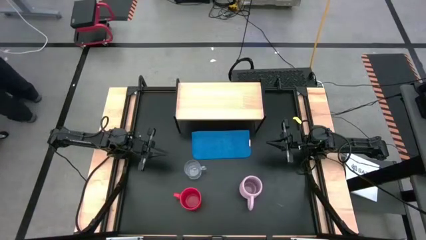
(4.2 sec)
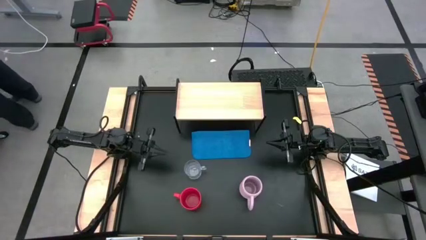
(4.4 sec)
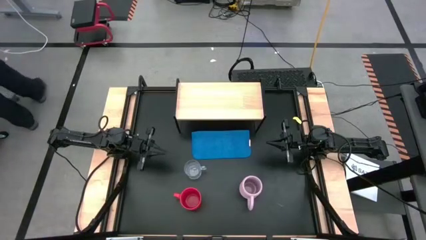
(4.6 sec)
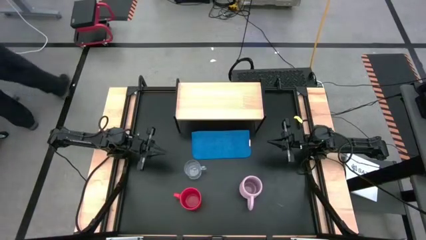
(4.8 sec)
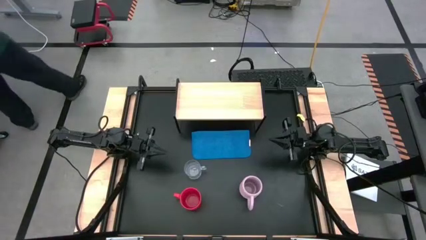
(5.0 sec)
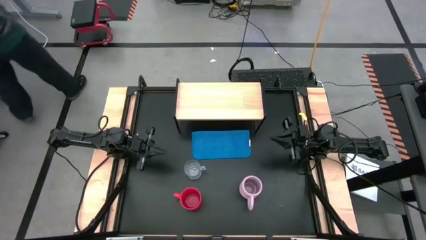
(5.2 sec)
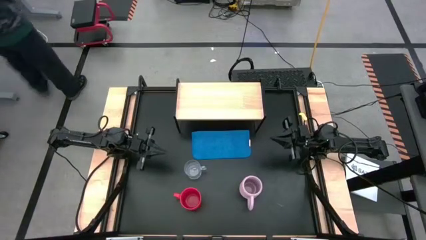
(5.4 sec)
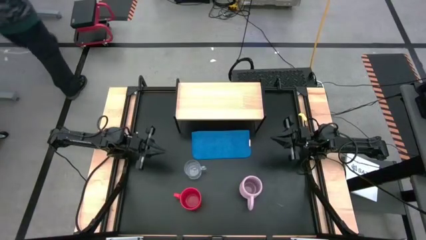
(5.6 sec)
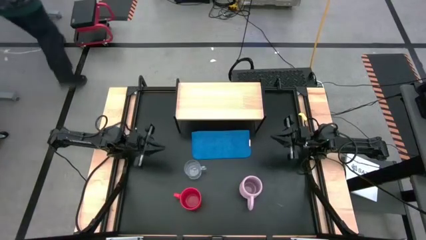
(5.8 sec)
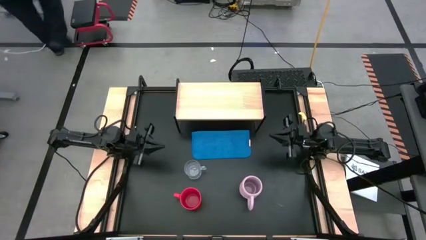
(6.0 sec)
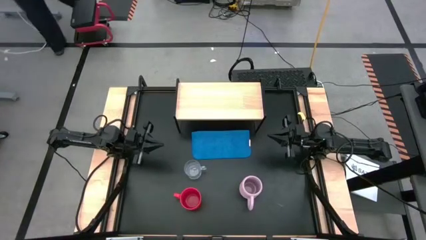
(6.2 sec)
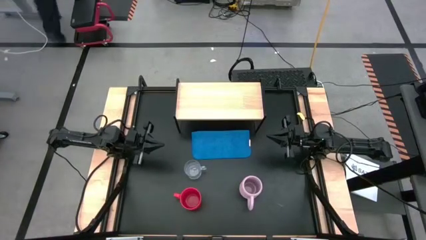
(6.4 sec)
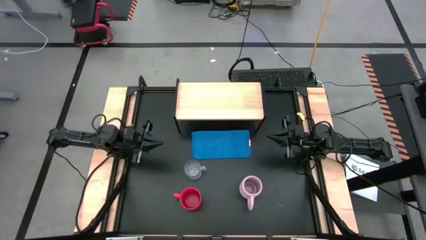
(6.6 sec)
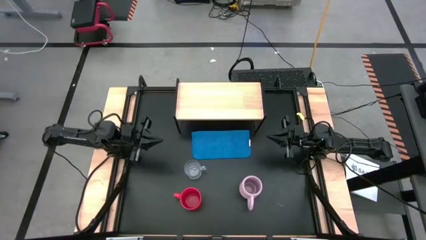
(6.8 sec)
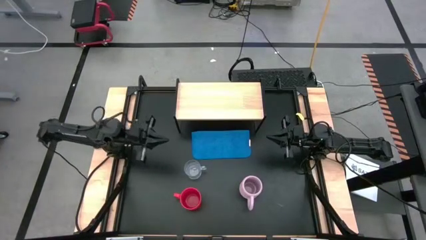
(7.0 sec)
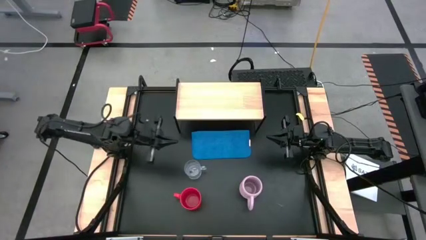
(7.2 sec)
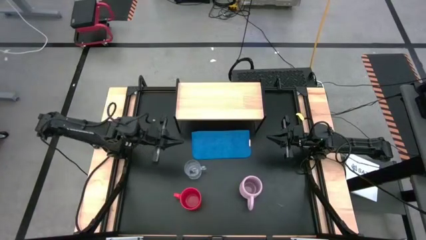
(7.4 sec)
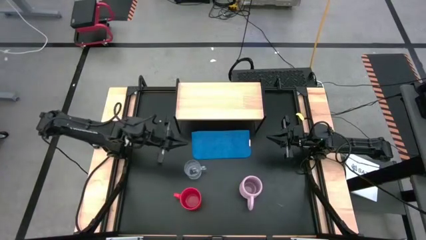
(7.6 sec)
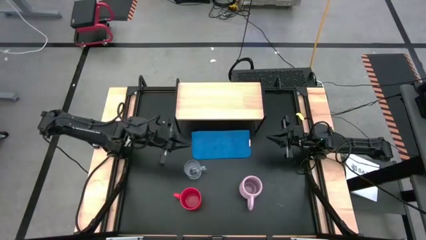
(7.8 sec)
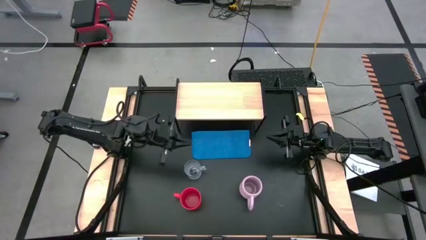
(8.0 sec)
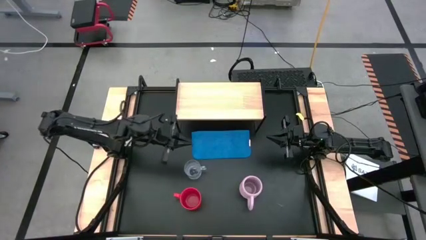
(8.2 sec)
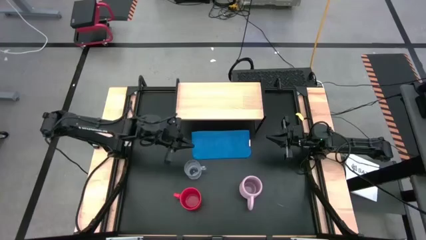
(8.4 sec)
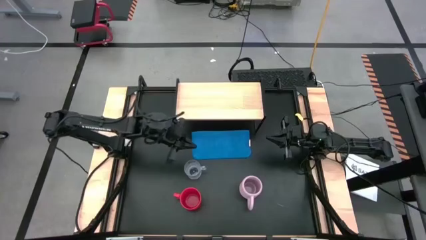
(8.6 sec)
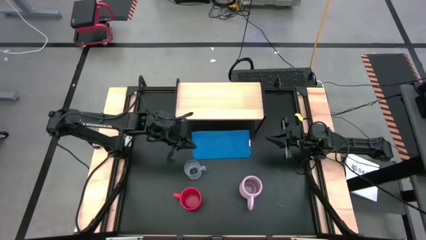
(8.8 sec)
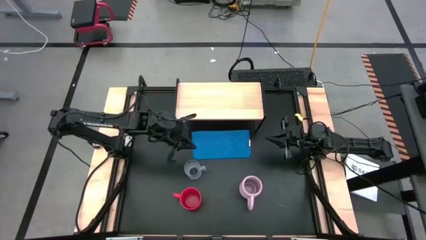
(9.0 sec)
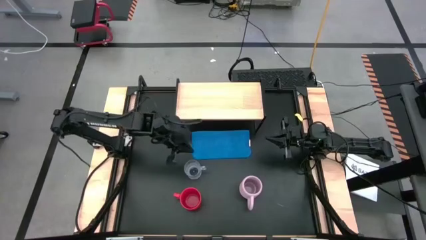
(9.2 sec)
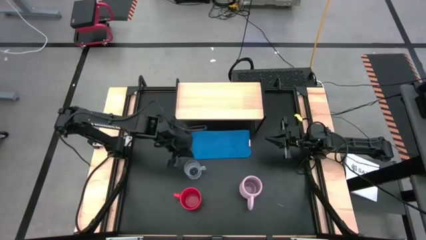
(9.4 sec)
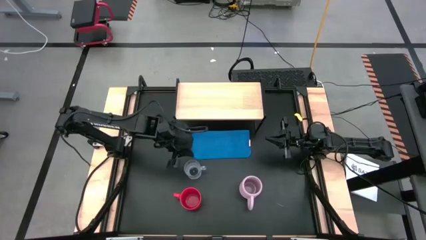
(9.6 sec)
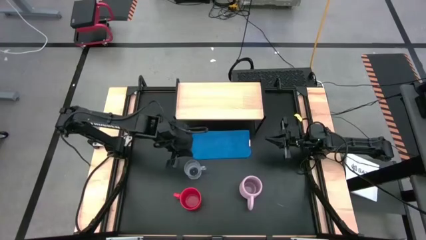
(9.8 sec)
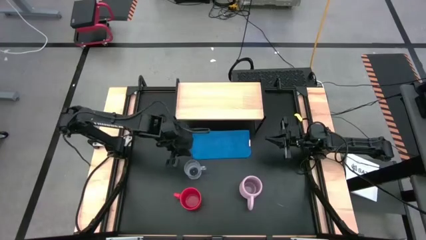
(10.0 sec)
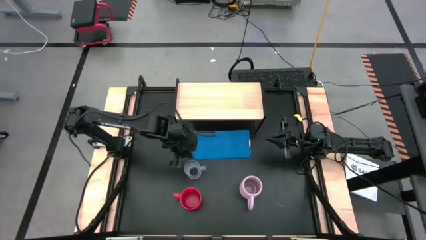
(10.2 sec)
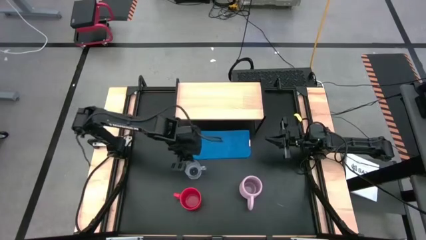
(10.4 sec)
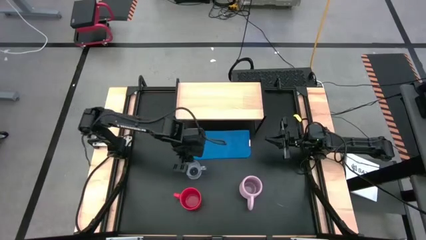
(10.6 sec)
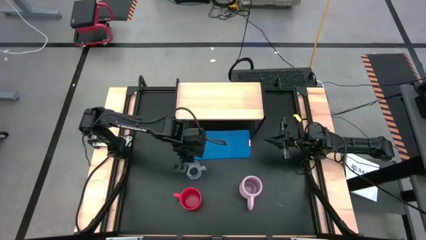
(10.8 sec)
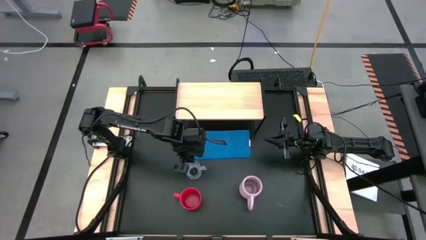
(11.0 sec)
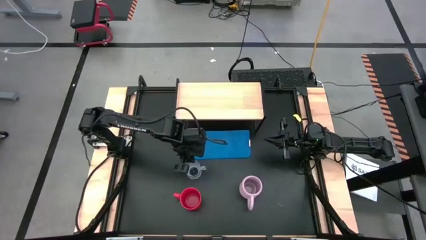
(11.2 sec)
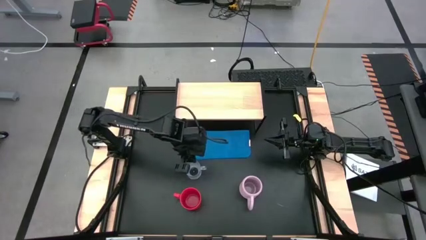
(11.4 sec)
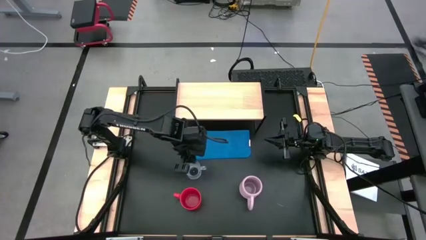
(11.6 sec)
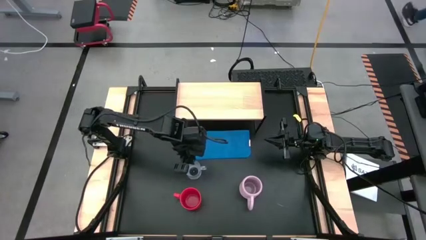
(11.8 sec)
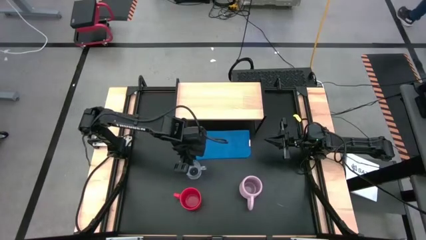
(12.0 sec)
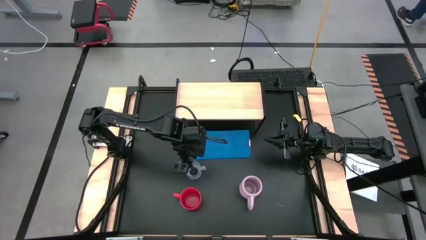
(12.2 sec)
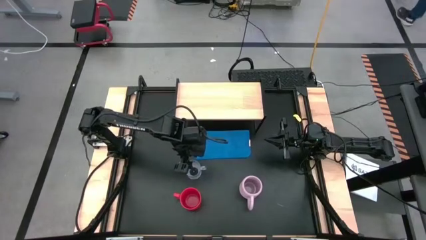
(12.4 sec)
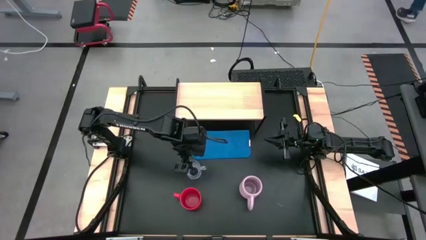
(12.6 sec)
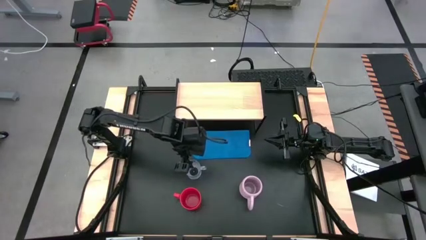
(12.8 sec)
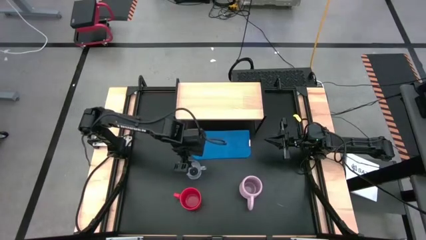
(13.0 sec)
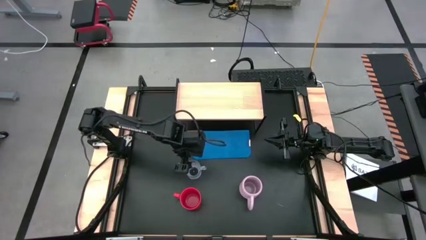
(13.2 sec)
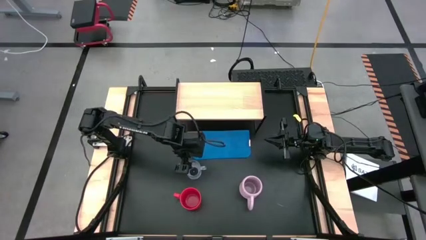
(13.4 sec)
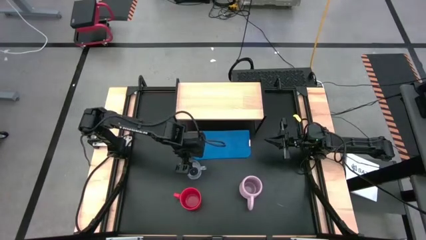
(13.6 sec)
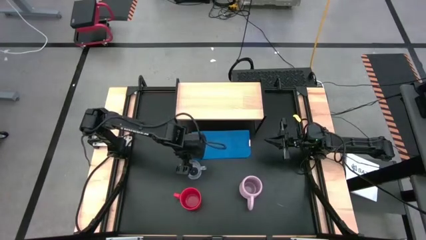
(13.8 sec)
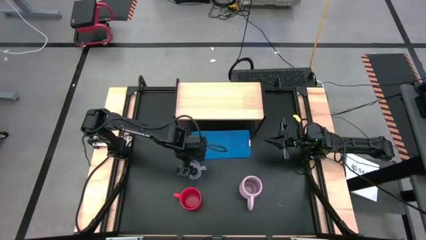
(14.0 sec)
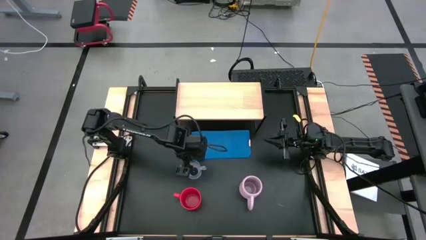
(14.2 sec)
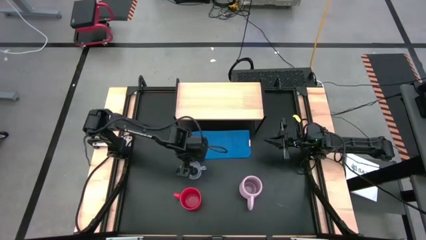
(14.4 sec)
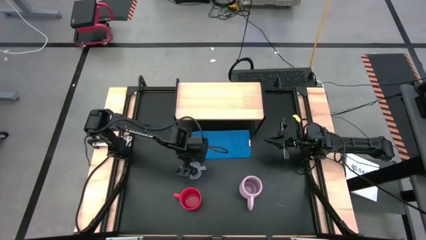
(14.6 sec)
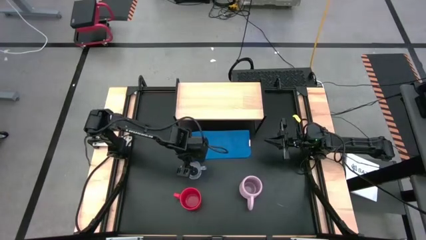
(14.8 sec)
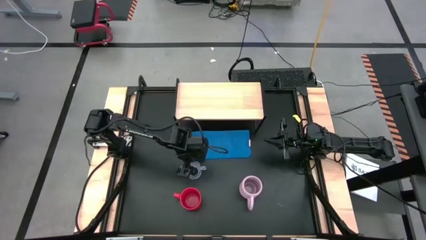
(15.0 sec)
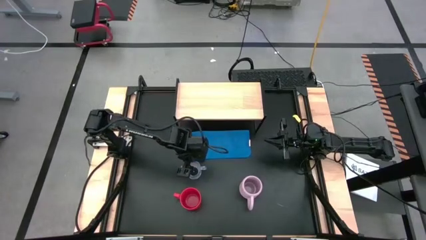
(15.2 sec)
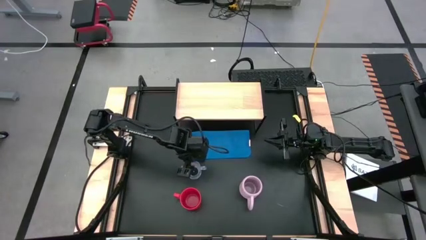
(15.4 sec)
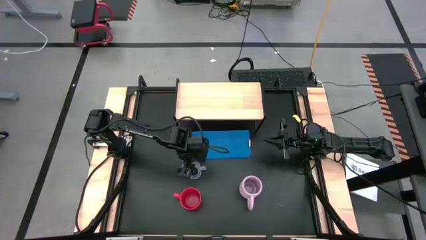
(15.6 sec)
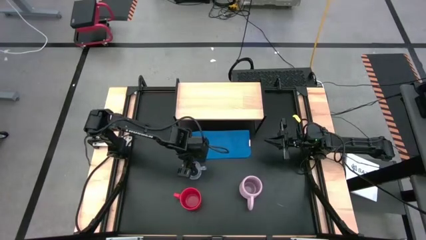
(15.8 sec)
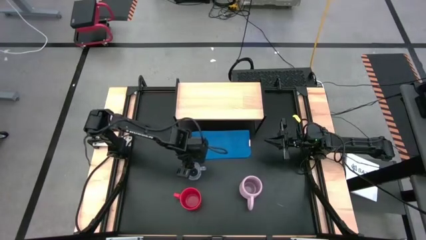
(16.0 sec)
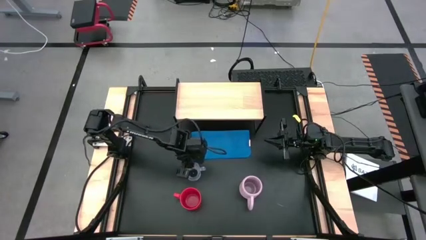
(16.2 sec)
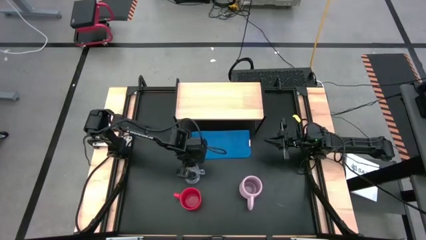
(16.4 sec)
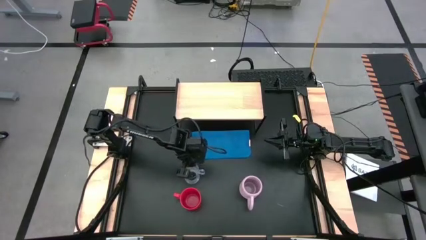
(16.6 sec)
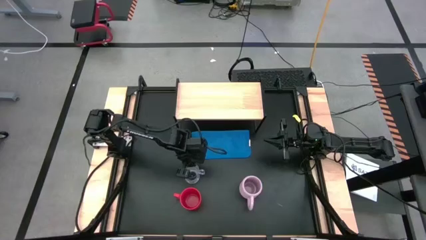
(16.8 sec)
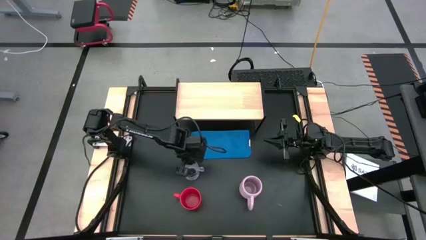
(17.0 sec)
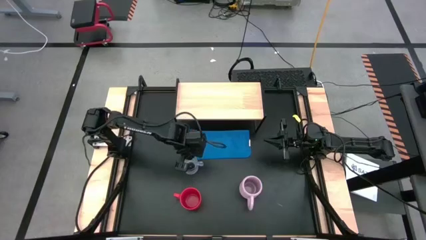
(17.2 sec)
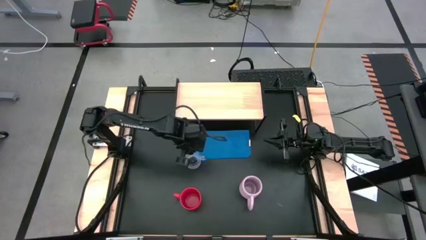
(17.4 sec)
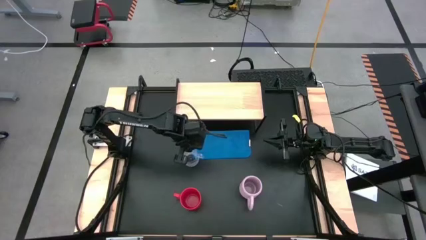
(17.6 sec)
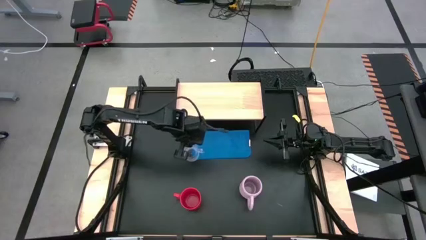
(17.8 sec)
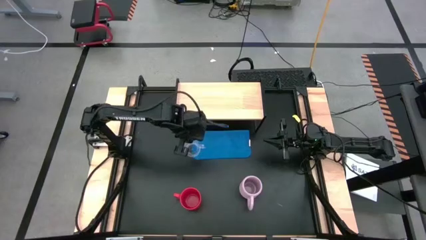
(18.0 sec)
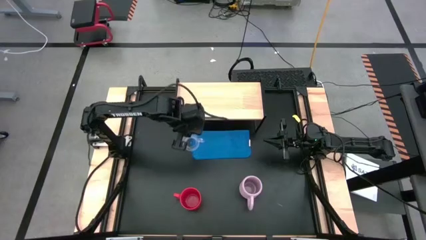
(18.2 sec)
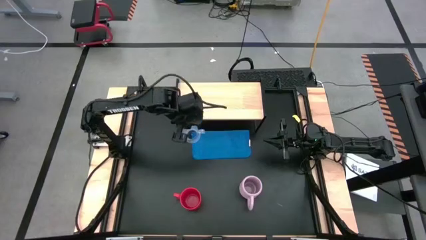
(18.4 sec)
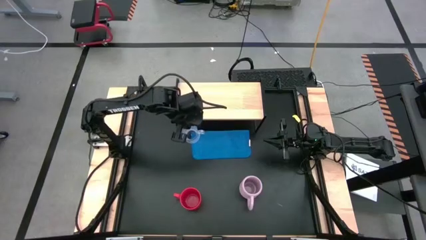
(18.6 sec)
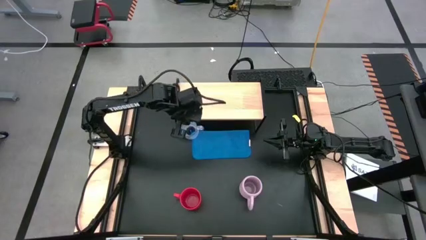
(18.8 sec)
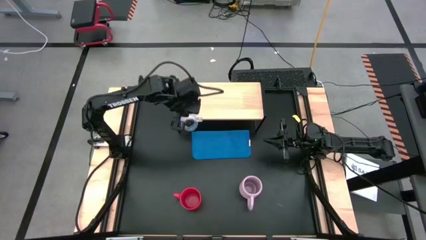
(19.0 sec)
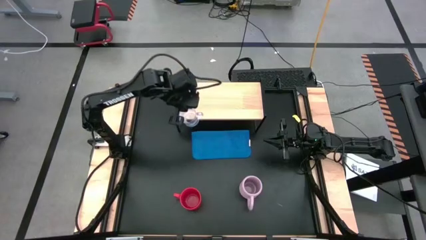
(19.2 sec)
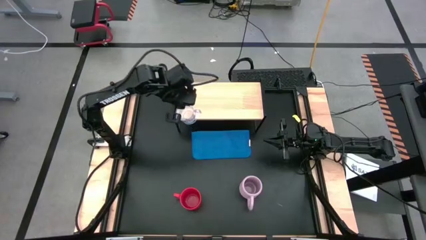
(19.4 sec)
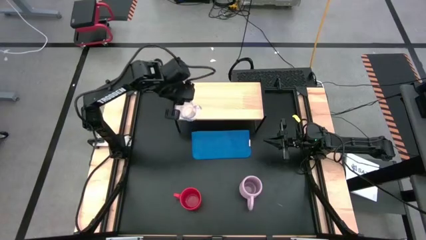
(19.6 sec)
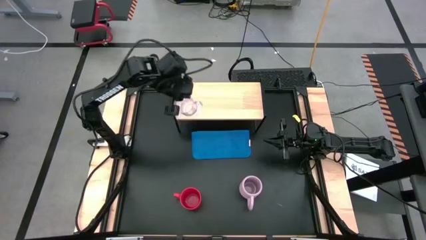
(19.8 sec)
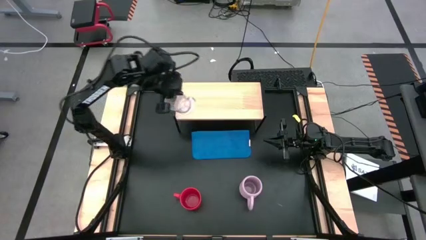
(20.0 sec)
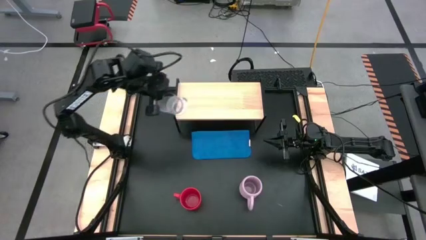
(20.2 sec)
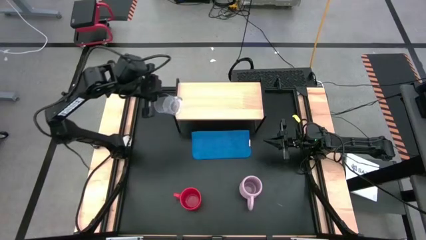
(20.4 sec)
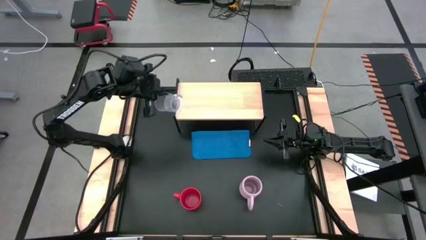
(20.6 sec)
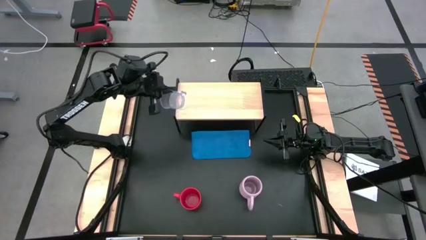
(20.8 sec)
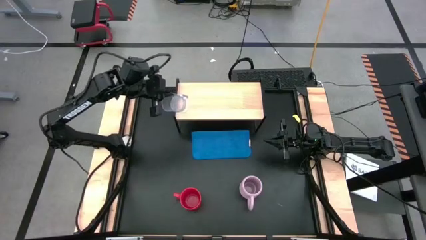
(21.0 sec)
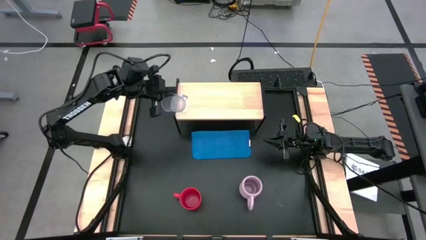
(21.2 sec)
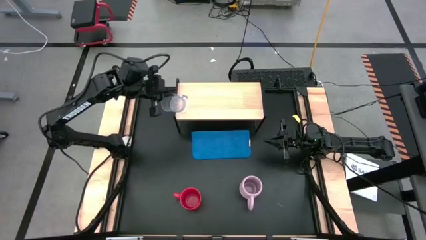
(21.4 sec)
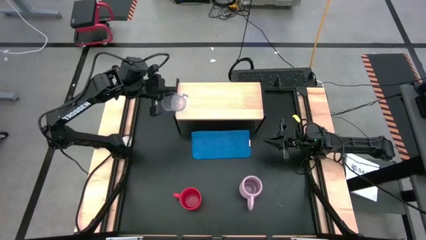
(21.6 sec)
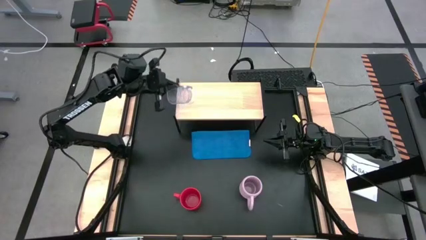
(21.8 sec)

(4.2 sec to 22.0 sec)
Task: Stack small to large cups/mugs on shelf
Put the glass mug on the shelf
